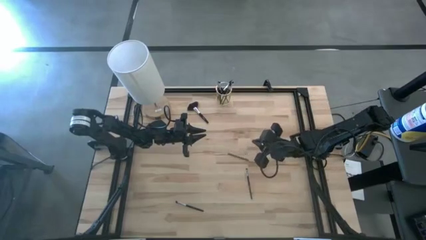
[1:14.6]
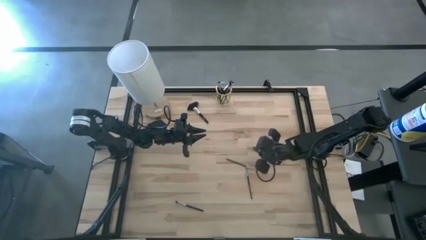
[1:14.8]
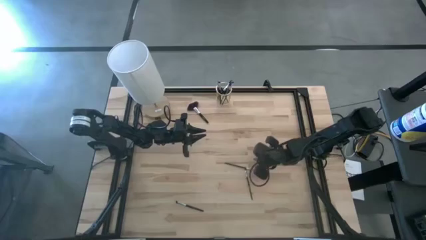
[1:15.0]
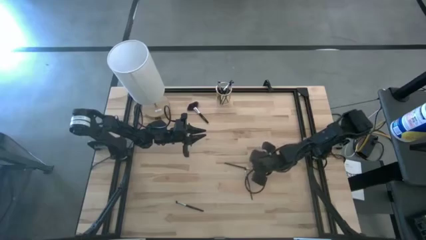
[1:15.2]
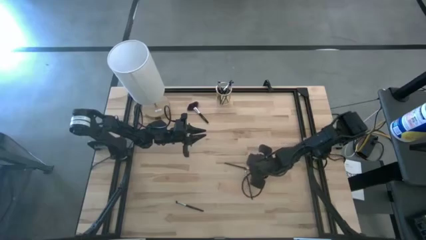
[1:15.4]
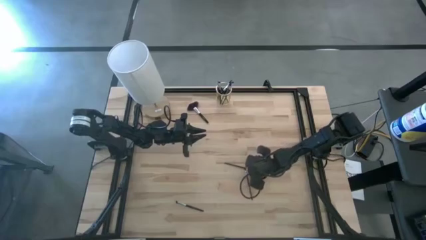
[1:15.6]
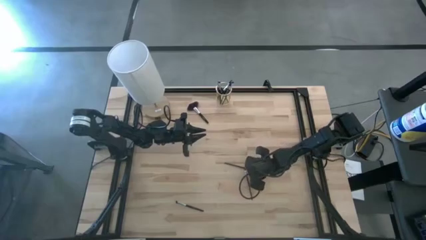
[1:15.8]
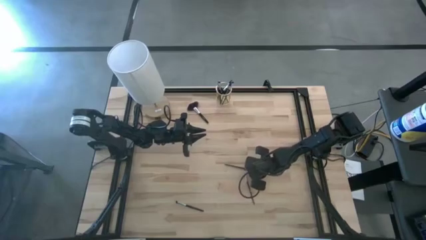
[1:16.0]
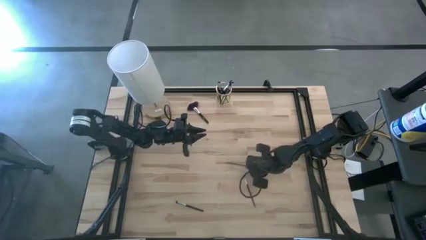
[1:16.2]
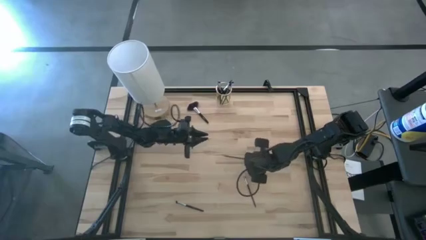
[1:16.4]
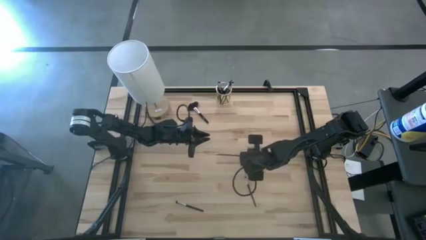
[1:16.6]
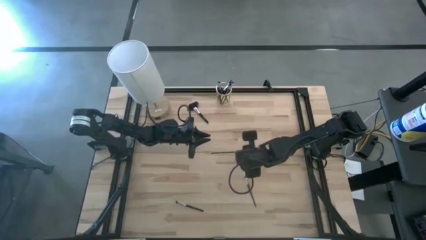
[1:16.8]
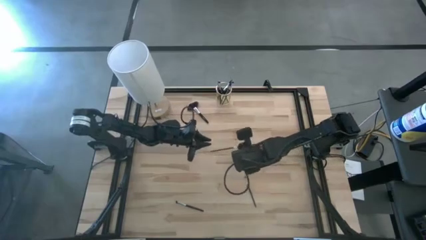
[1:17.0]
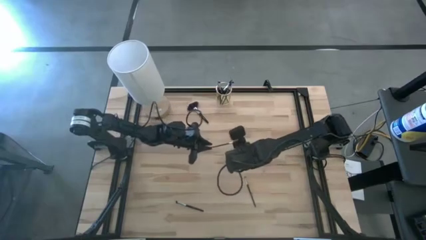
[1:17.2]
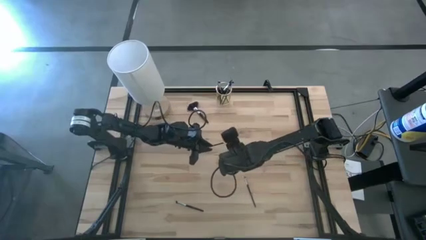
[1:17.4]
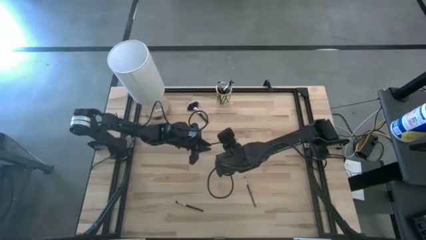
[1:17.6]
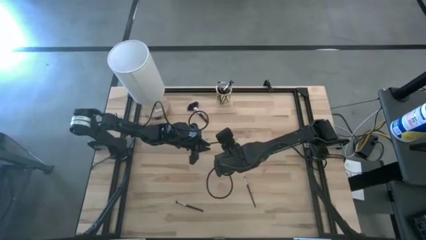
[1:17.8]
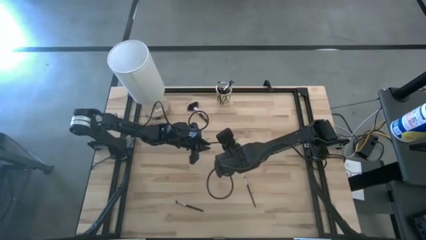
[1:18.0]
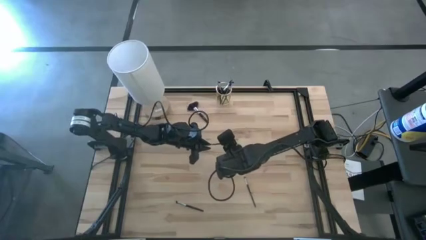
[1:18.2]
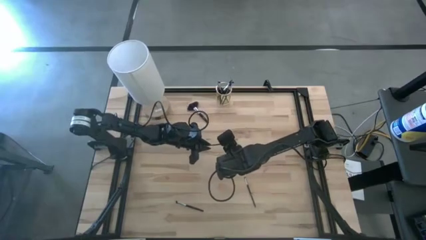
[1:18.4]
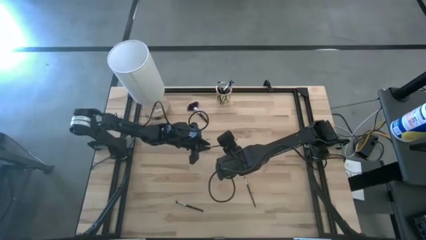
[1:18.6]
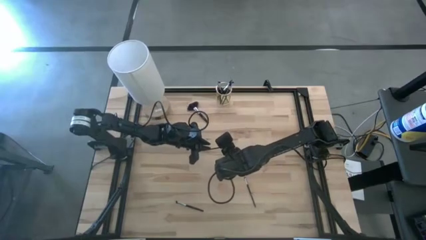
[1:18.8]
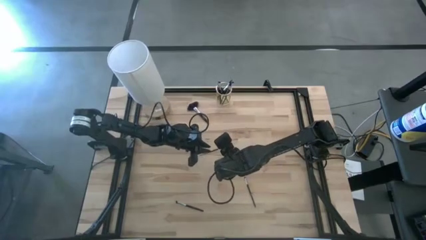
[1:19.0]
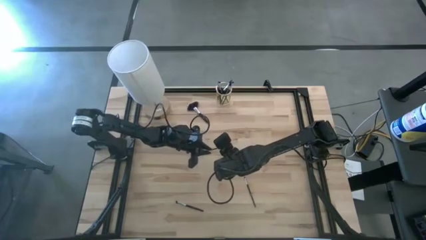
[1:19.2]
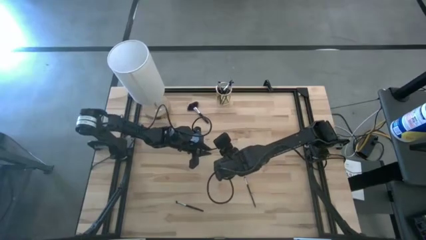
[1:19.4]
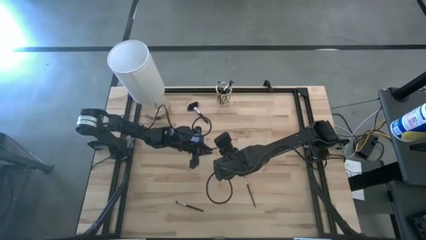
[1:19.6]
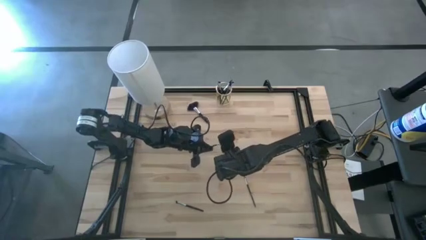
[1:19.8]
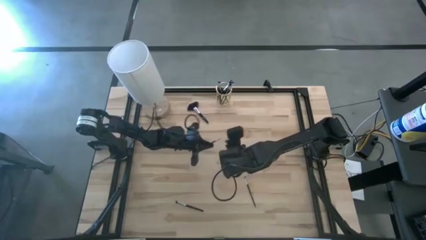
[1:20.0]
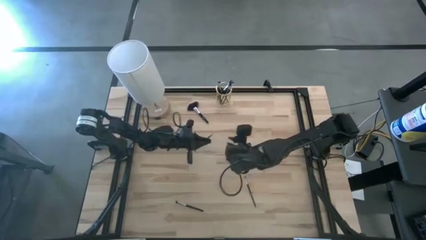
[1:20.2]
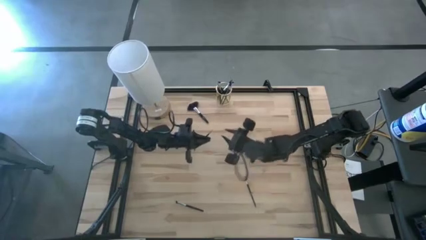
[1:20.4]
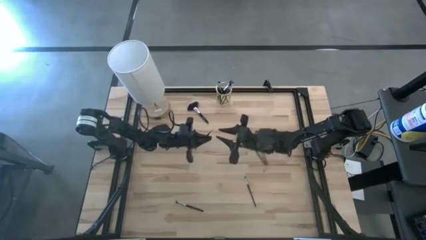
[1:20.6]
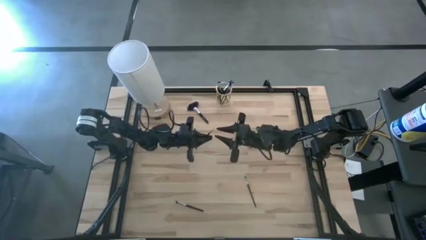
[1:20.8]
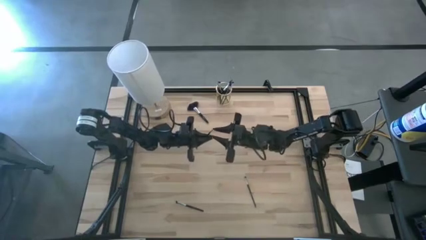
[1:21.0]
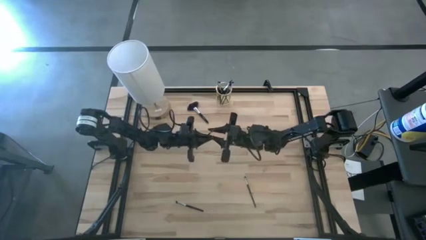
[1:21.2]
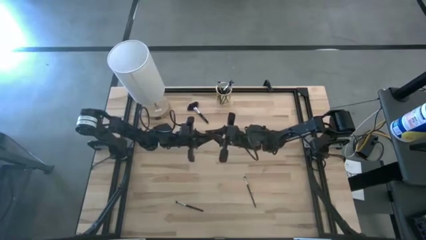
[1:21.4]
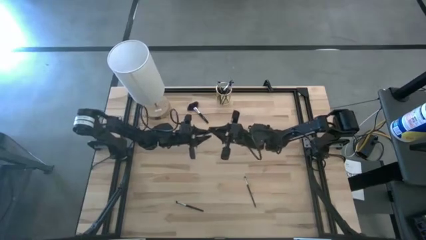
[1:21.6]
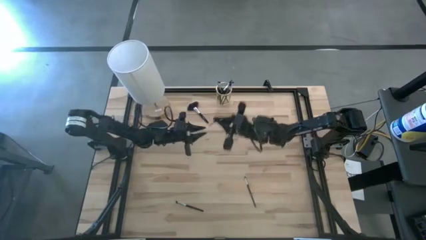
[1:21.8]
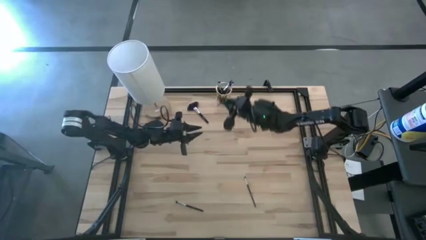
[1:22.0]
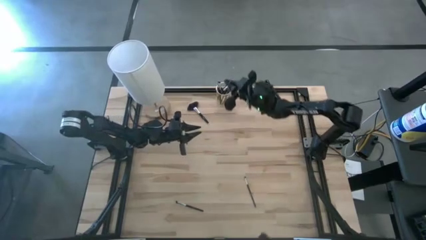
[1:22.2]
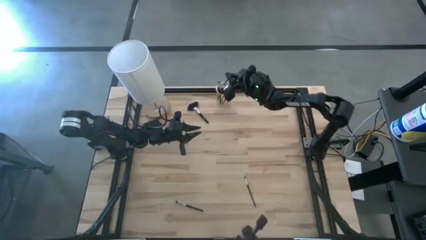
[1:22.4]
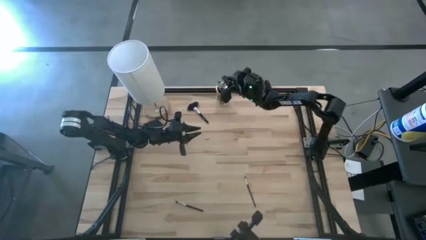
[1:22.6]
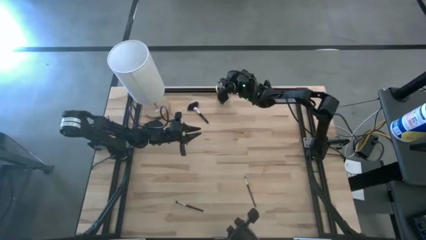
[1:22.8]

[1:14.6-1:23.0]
Task: Put items in baskets/containers
Put the eyeshadow brush into the gold container

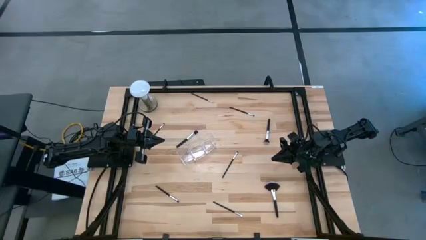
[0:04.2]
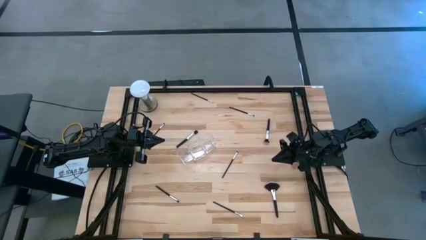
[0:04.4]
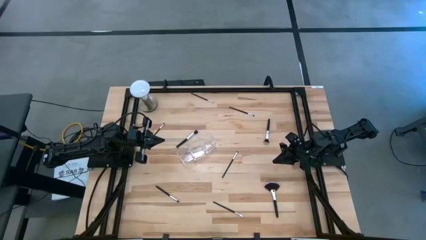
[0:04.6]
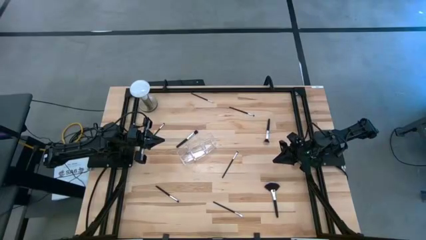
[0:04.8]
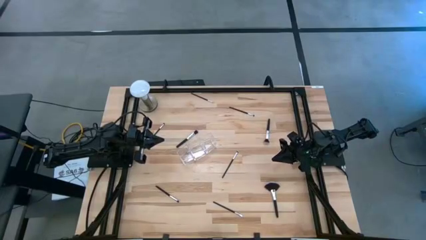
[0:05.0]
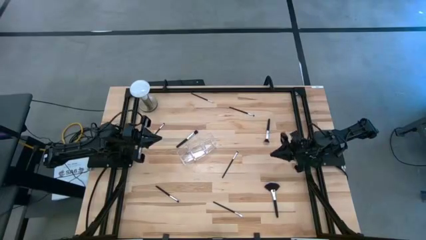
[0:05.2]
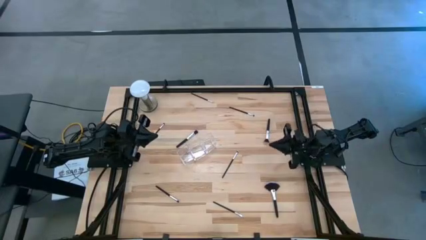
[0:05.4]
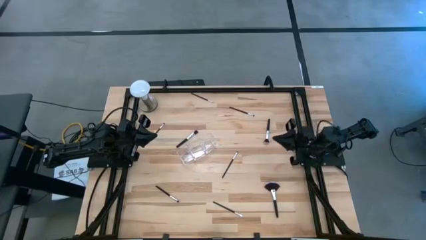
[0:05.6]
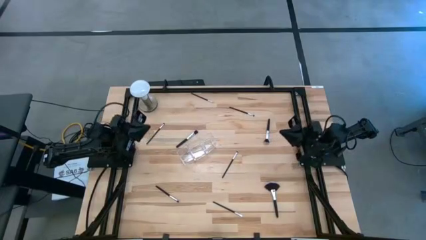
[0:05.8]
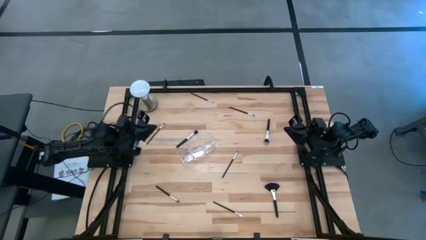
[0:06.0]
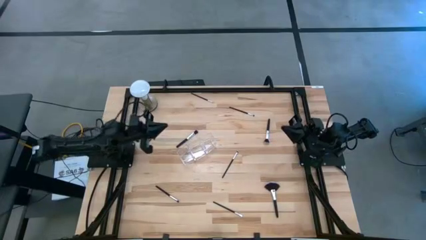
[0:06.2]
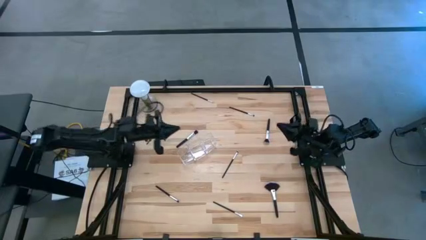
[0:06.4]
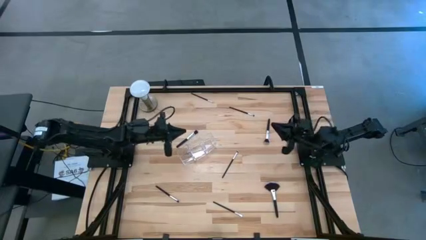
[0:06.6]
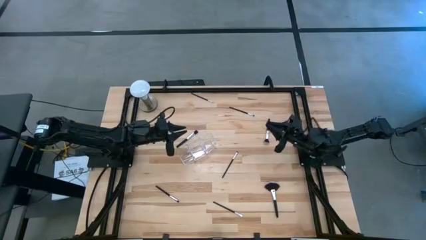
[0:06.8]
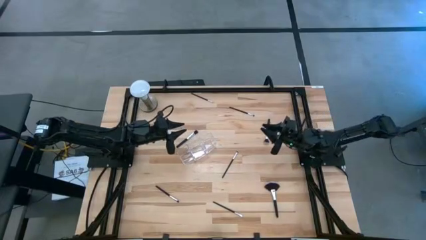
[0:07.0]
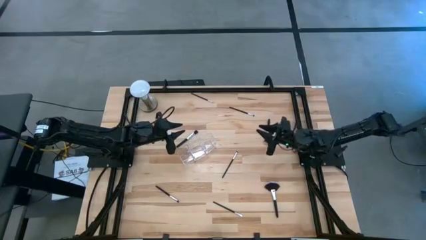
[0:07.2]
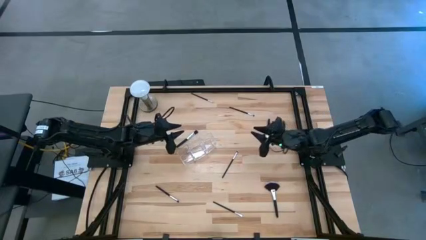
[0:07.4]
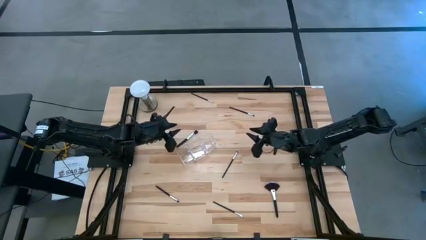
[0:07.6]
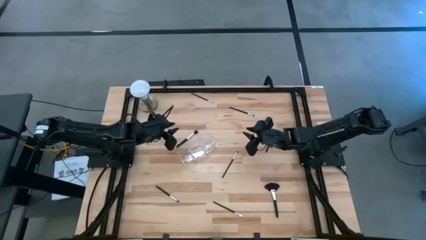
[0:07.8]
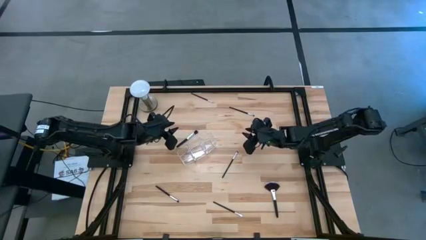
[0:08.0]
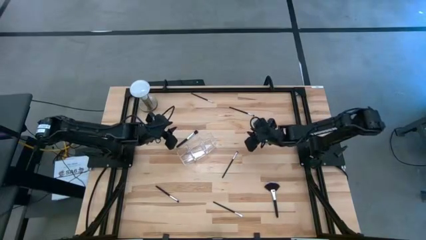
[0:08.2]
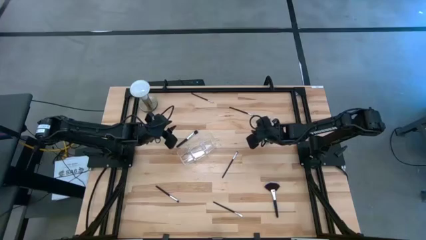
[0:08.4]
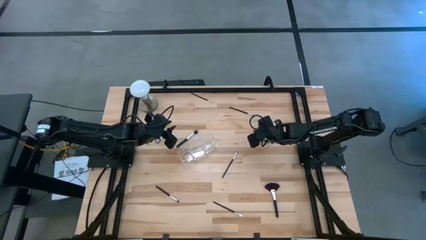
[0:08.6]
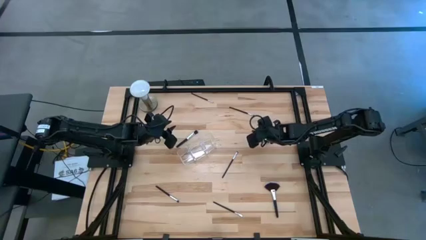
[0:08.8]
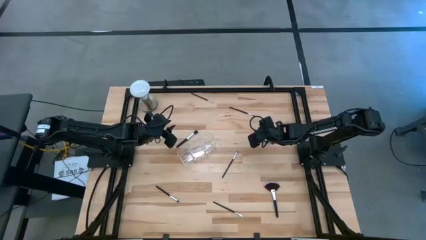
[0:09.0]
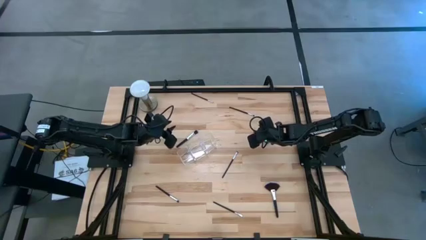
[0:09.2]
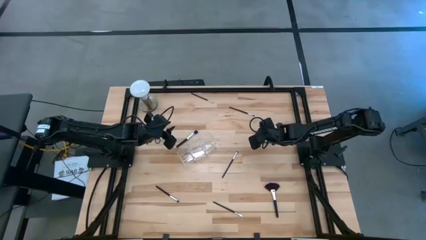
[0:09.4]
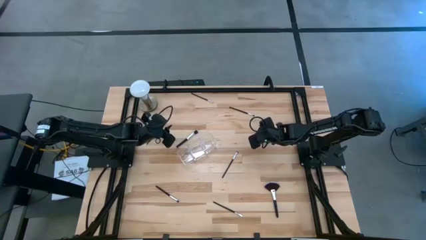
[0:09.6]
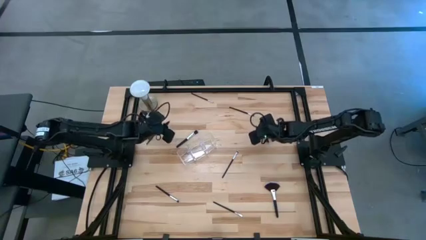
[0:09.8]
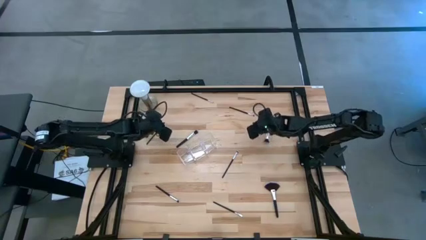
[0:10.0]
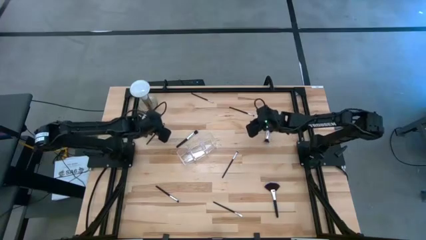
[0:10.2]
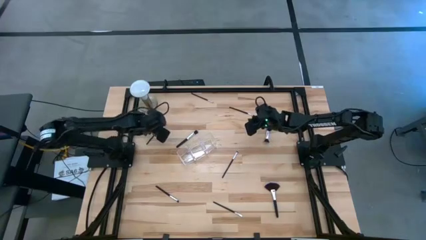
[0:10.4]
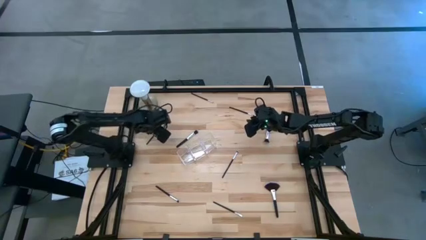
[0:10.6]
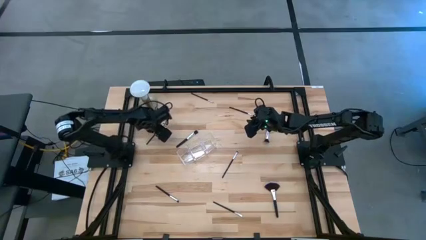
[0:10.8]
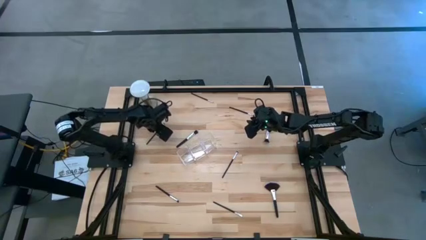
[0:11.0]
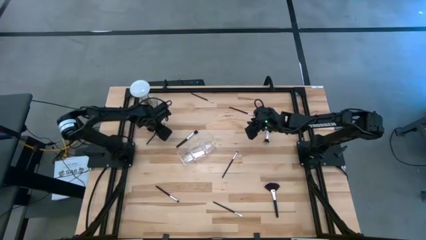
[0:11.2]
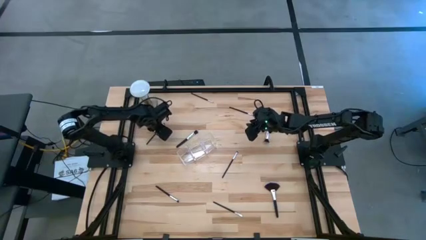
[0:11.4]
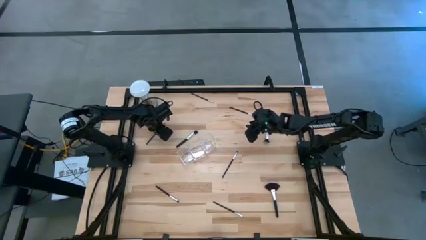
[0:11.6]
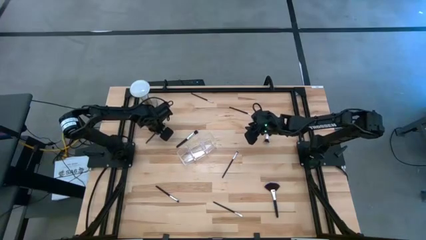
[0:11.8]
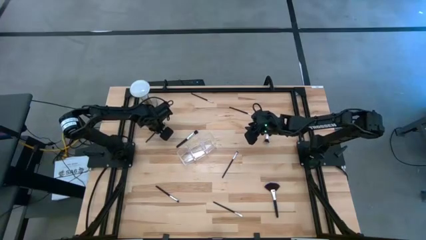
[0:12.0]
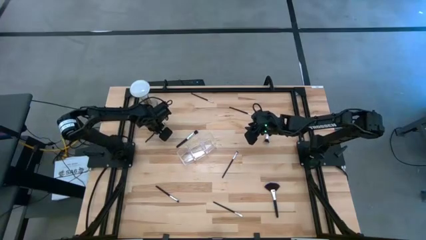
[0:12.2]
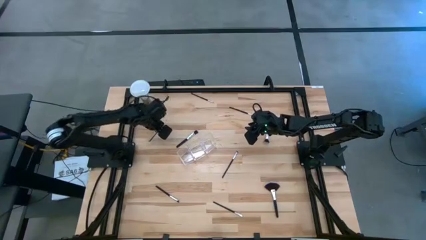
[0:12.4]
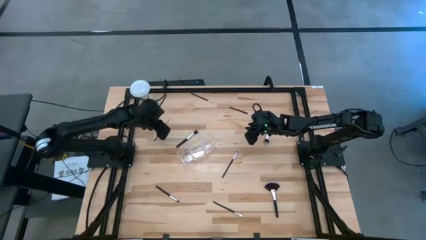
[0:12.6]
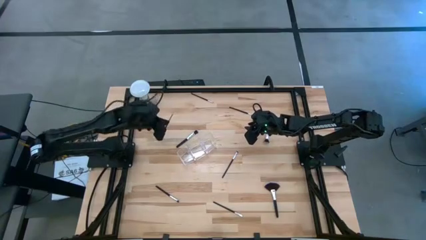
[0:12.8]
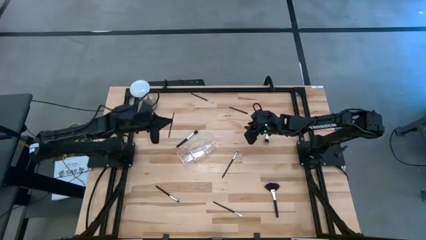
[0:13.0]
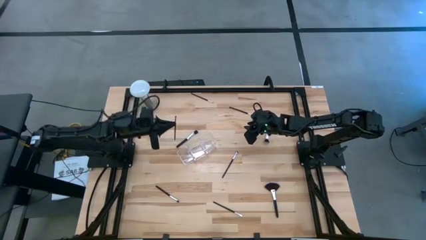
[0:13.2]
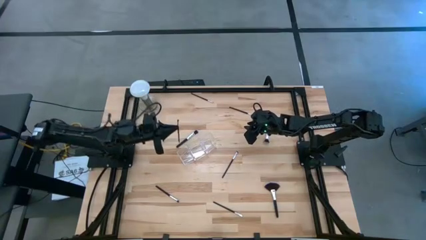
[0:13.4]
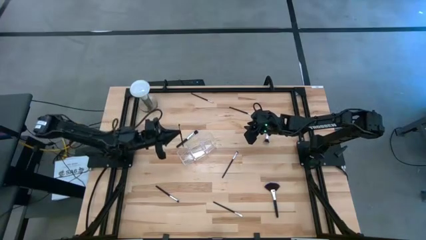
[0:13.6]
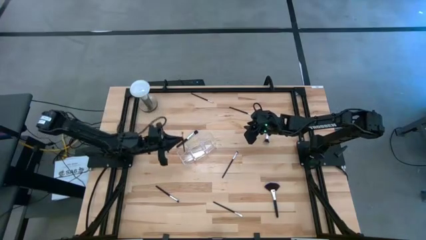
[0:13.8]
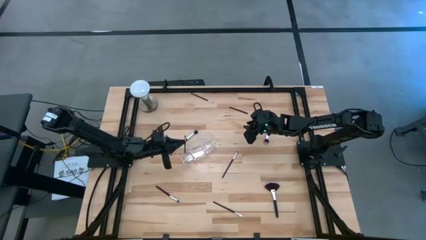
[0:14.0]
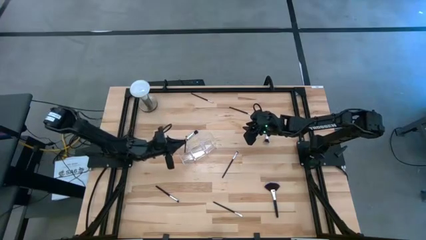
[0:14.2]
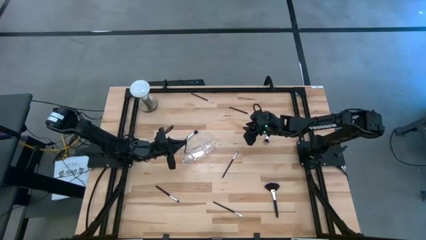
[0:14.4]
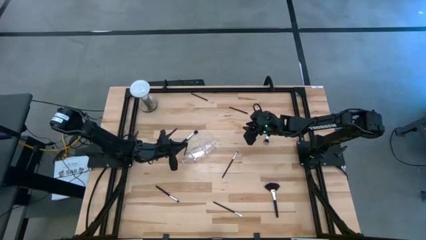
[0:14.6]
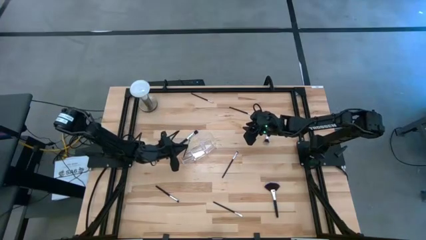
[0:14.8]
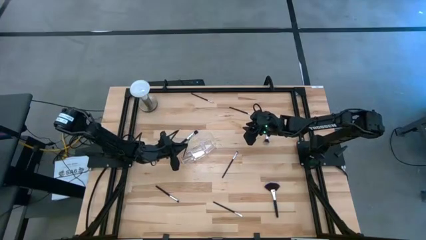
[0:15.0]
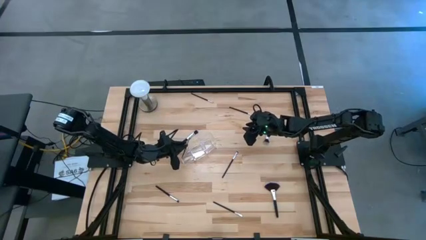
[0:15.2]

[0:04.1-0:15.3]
Task: Put items in baskets/containers
Put the black eyeshadow brush into the left section of the transparent organizer
